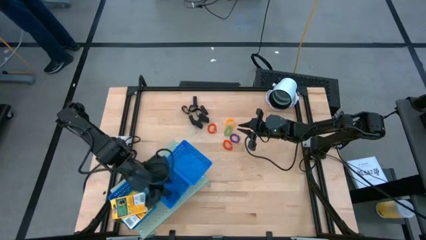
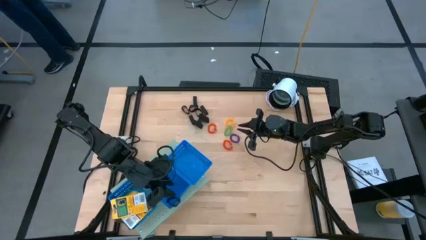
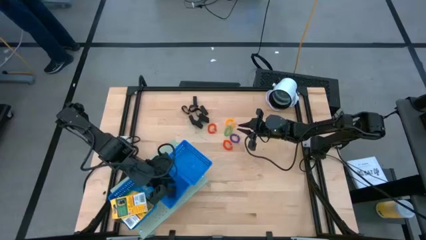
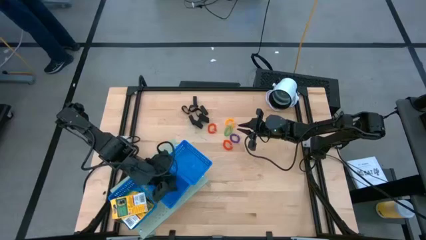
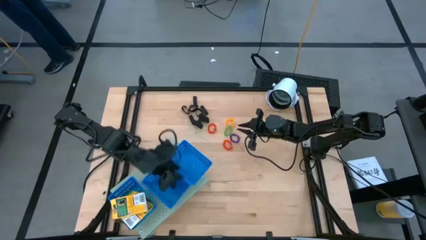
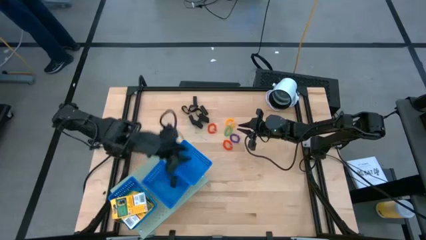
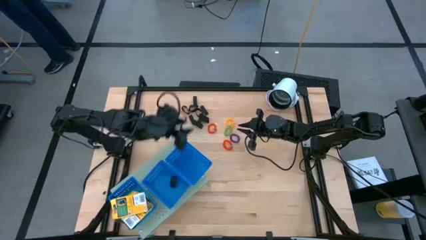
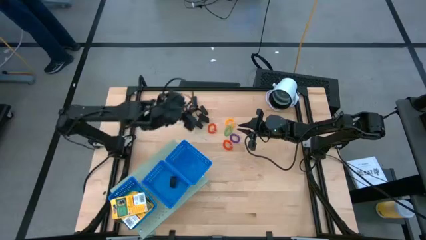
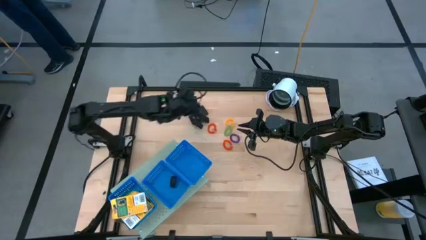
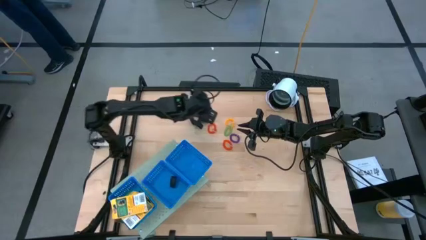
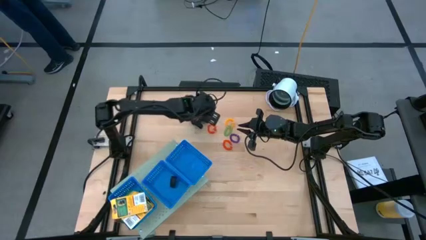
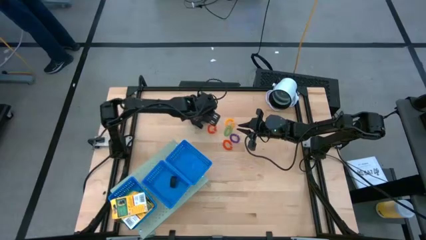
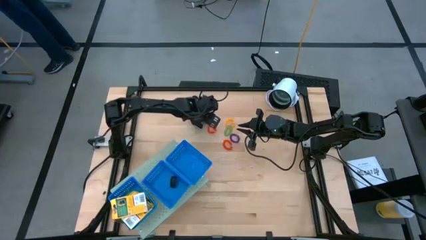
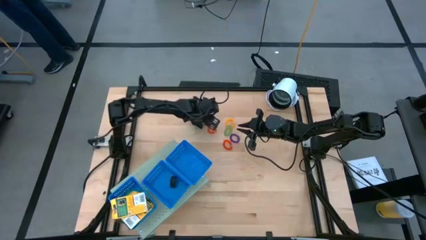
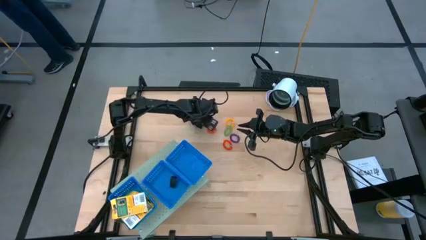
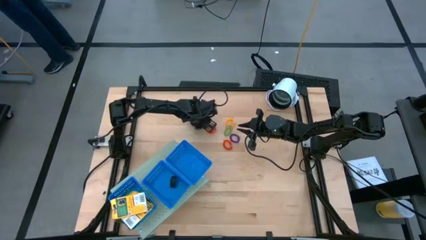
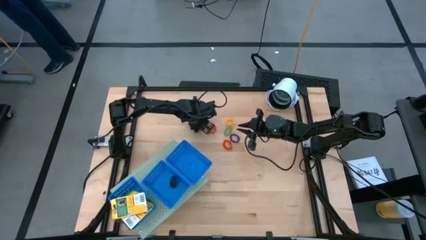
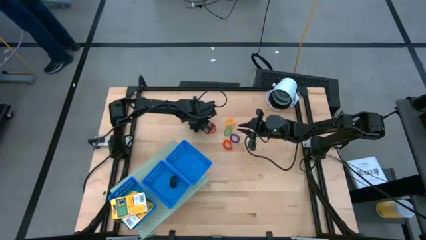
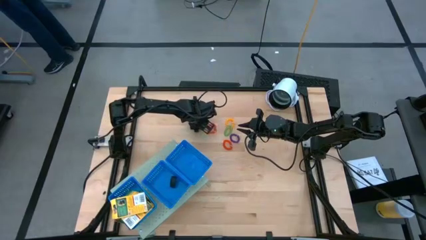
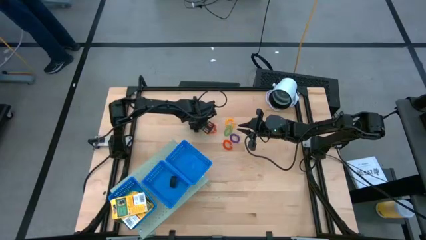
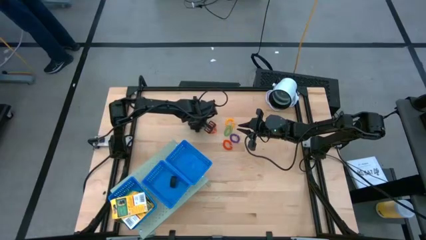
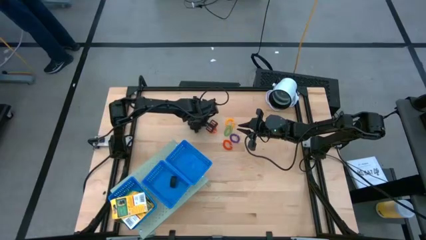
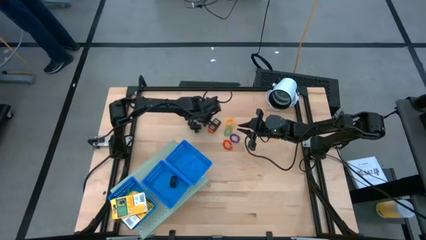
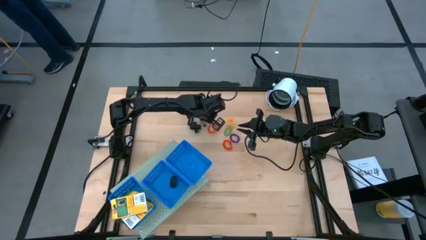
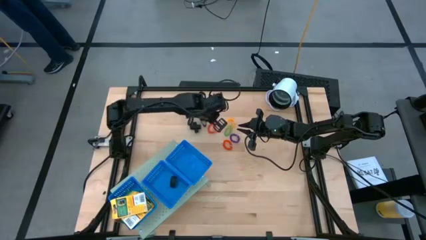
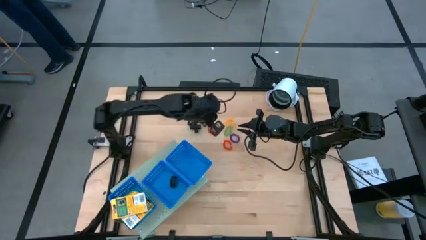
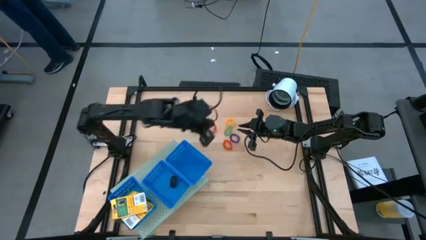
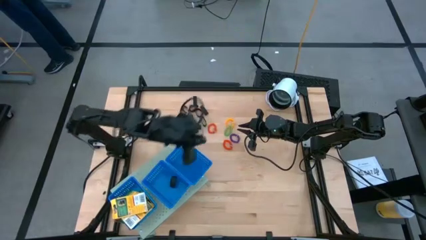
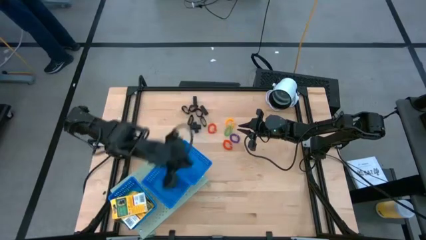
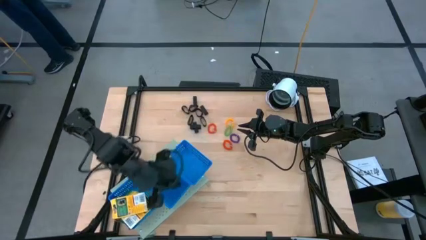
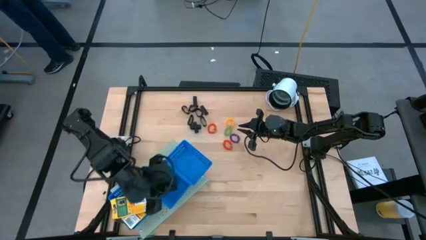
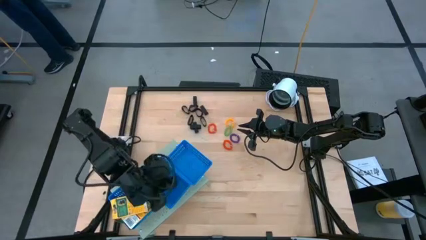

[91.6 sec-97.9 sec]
Task: Pick & Place Office Desk Supplies
Put the black rubber band into the center blue basket on the shelf

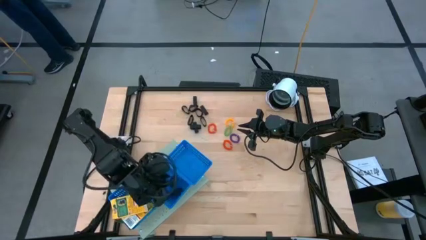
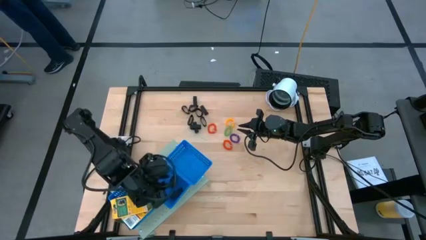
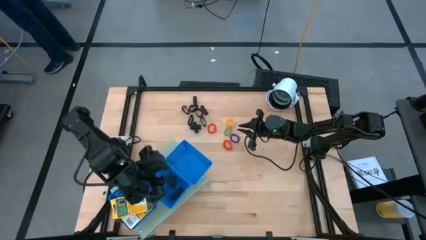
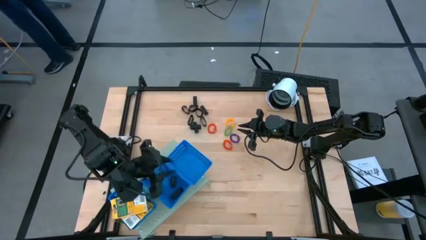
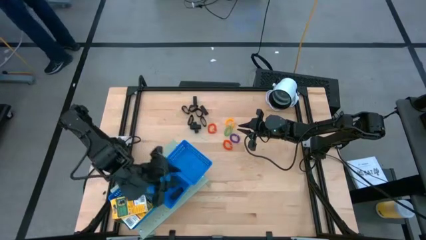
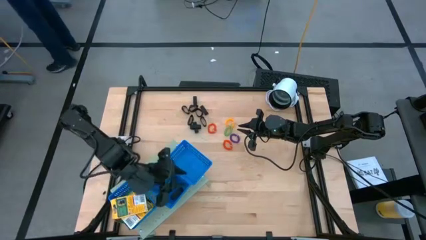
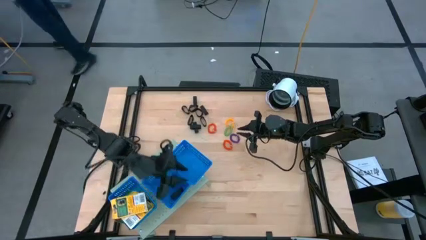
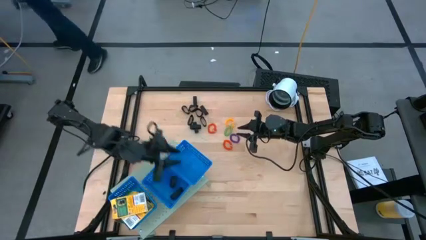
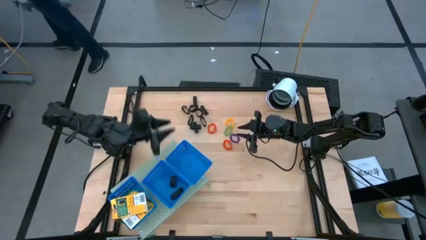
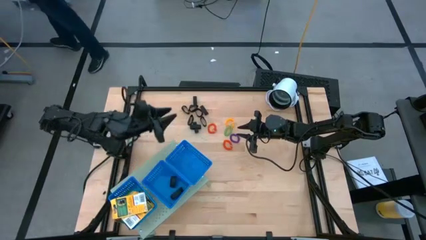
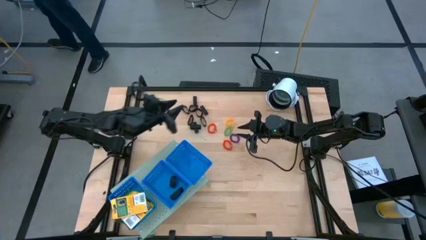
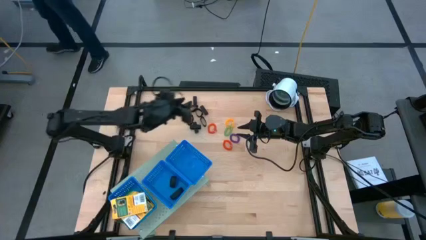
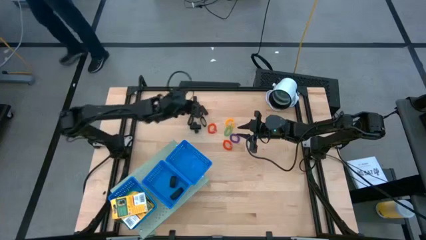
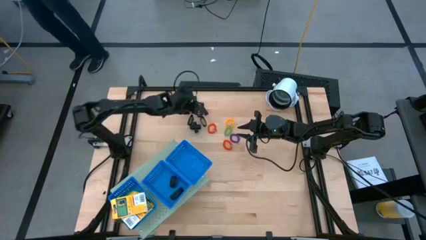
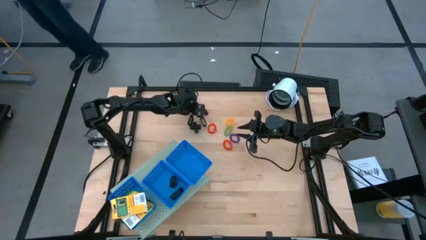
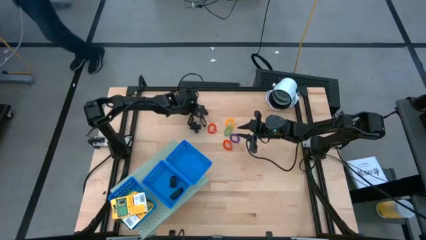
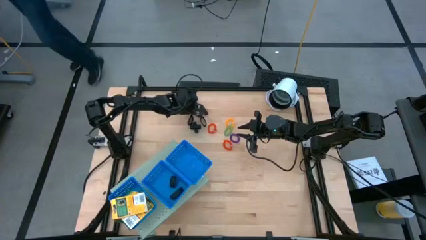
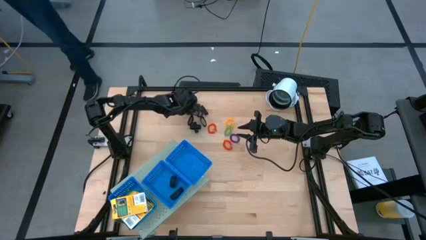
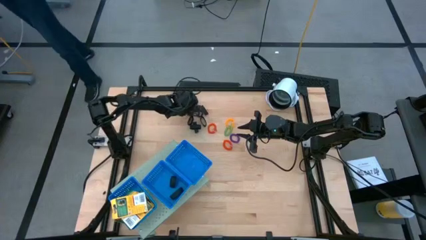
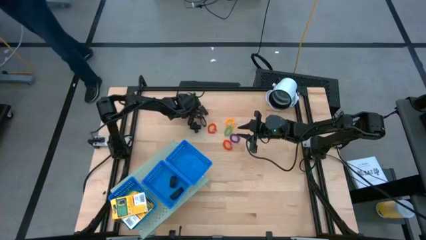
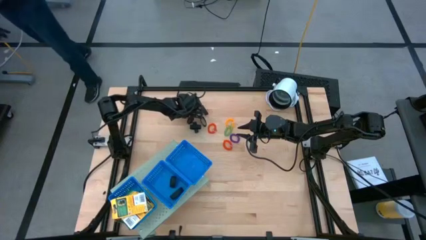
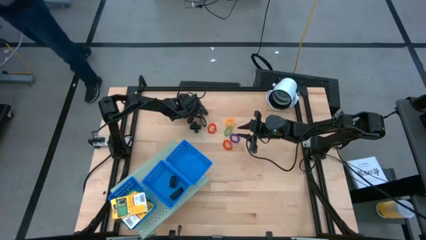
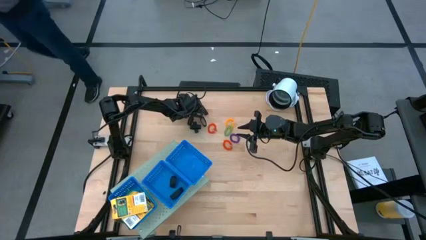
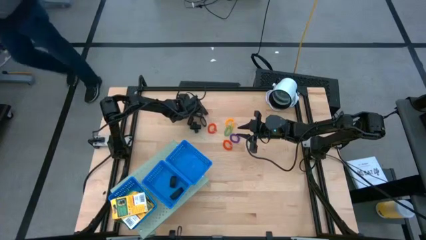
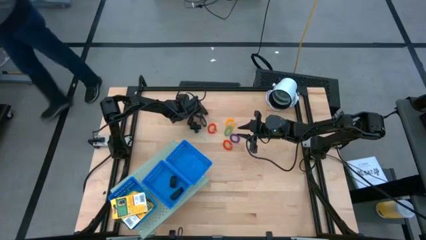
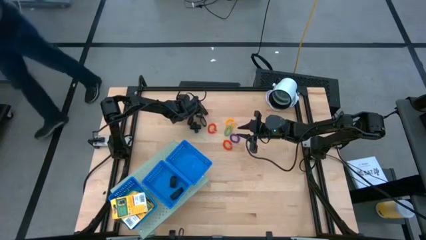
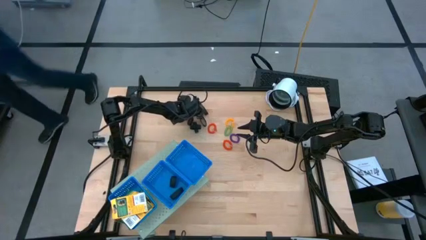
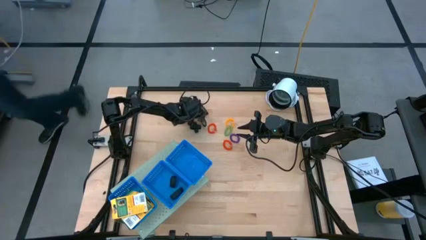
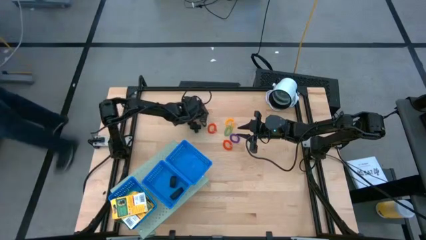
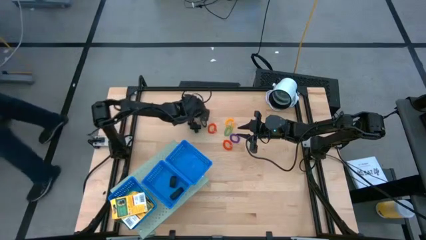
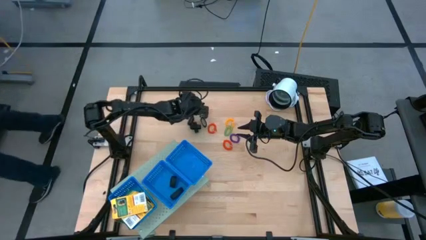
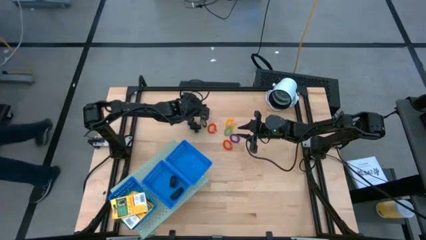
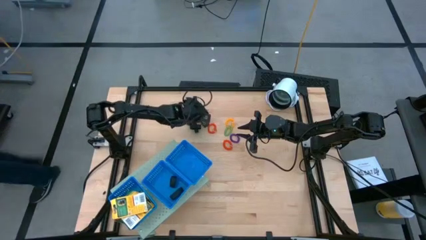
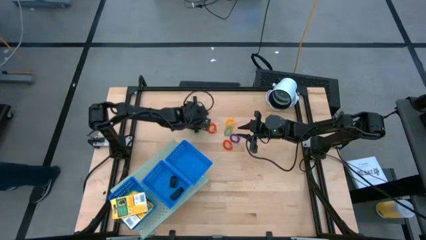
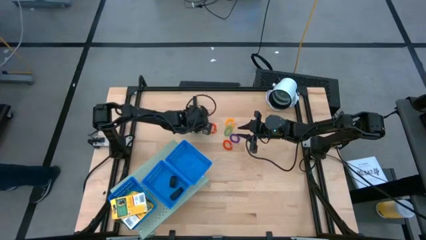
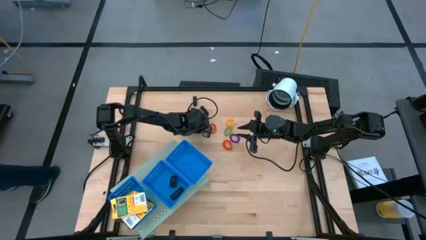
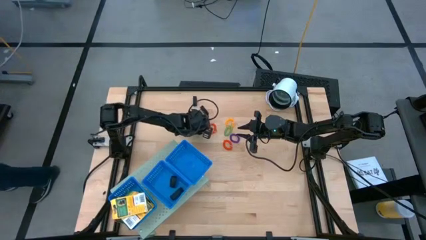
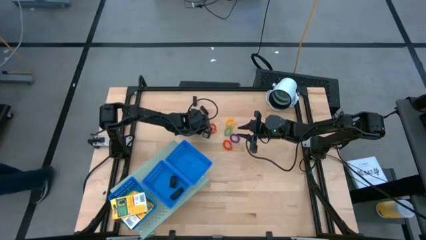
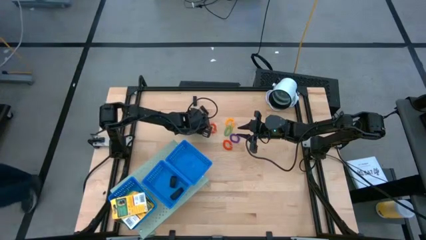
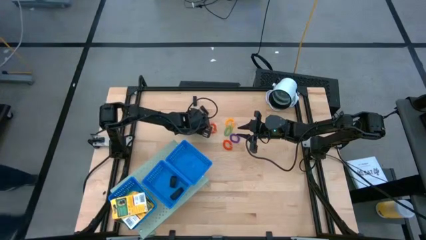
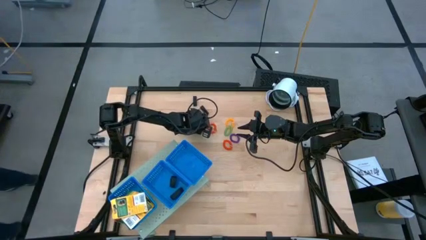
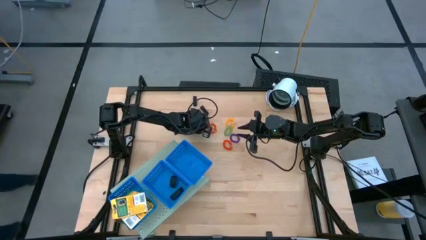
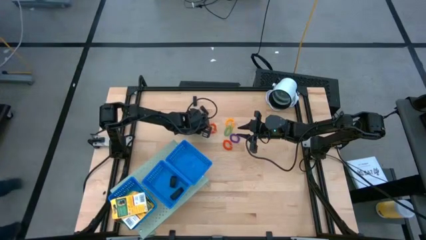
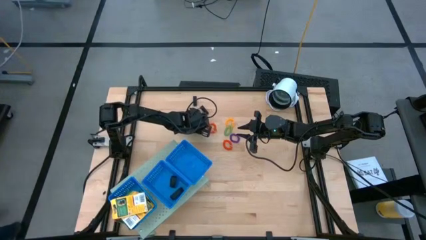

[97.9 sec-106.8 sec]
Put the black rubber band into the center blue basket on the shelf
